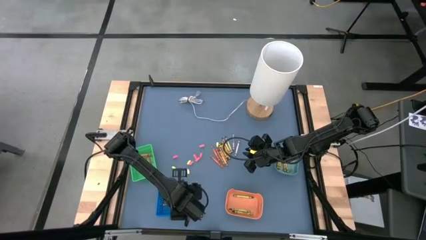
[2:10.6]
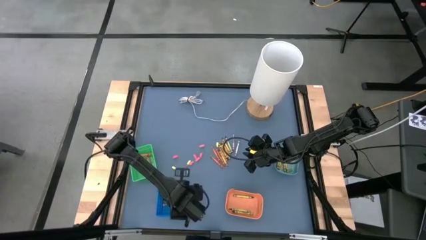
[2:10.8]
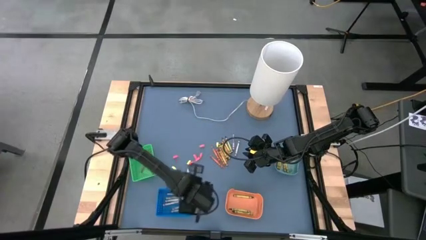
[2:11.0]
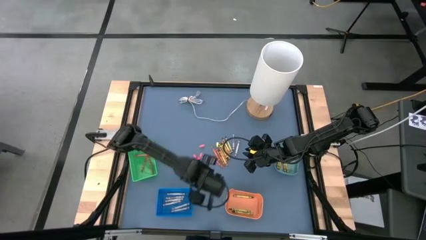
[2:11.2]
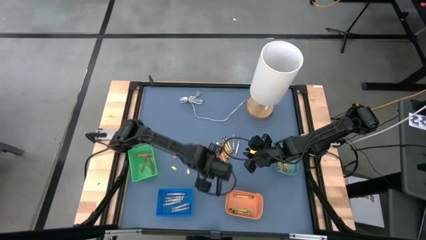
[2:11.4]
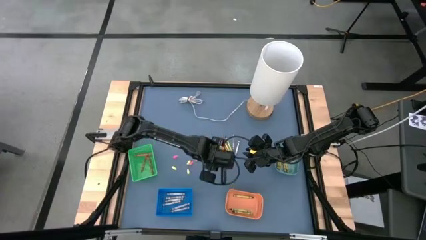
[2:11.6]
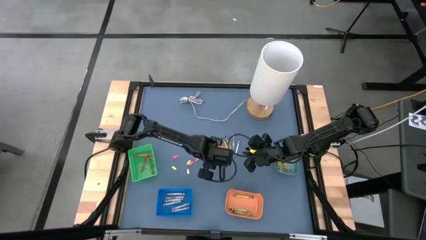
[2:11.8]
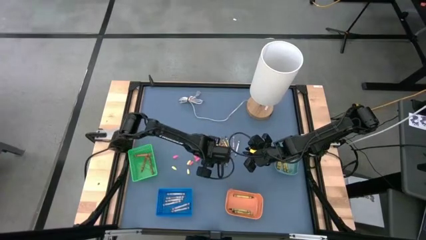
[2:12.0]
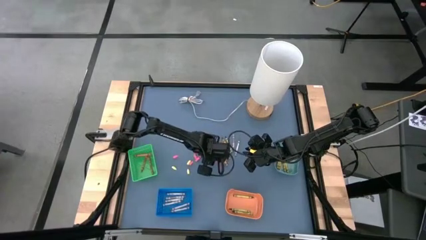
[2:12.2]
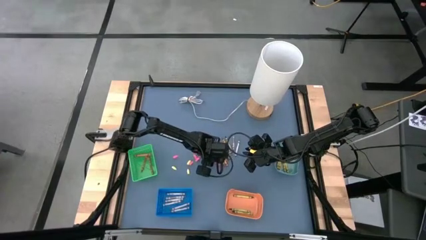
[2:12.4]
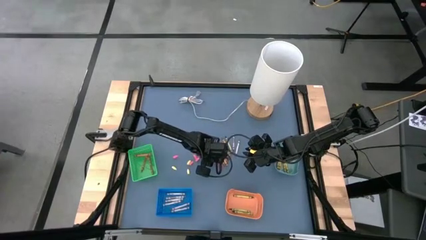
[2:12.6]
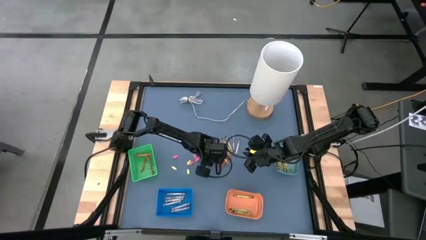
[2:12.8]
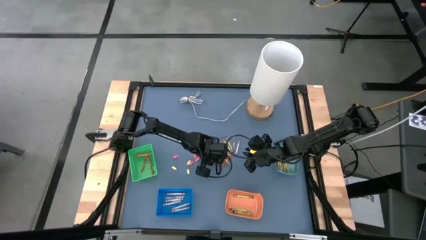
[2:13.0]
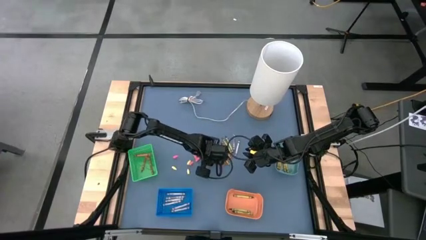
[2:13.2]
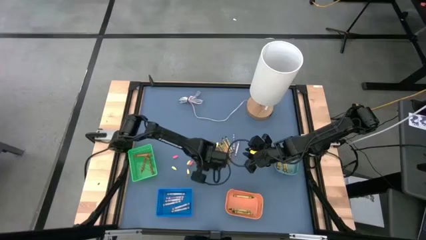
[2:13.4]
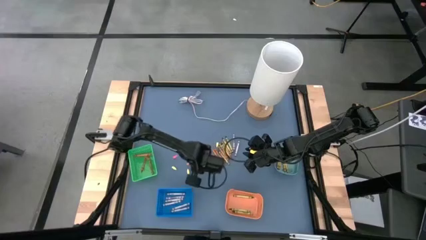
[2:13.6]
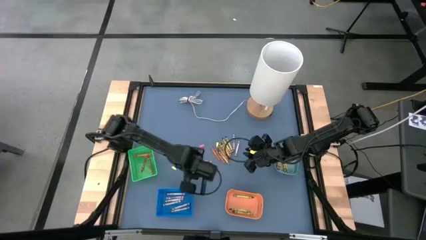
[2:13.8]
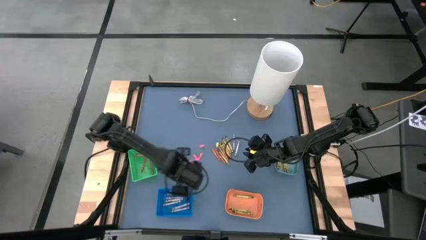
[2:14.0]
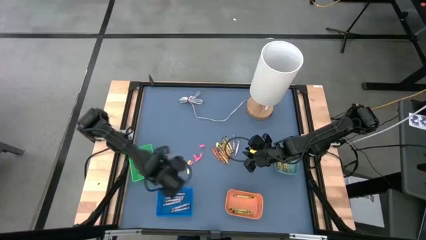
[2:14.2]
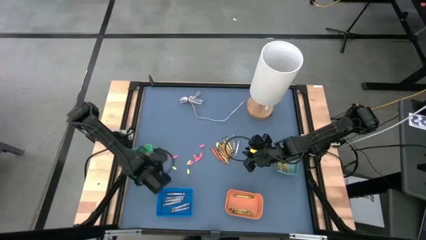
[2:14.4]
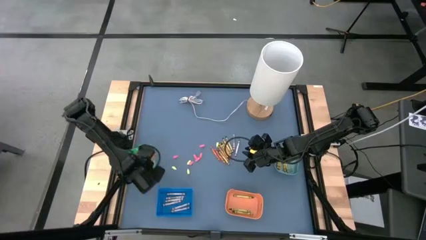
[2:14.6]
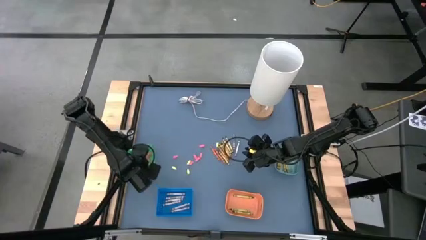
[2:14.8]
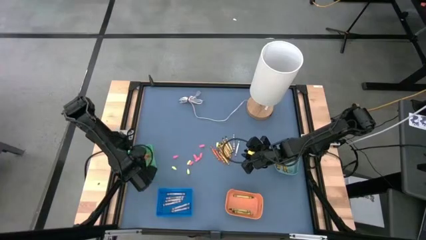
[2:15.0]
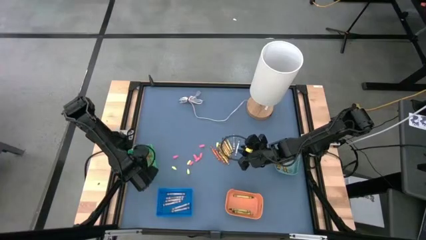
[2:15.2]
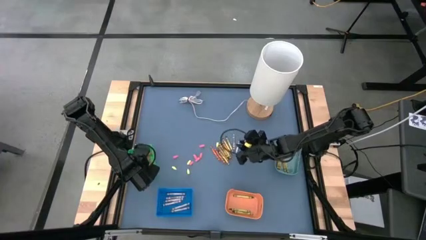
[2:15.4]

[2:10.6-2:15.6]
Task: Sort crayons
Put the orange crayon into the green bin

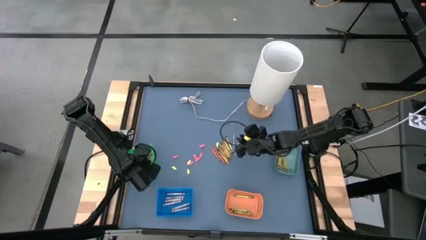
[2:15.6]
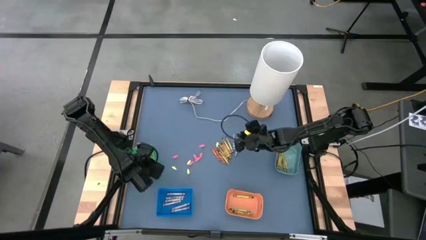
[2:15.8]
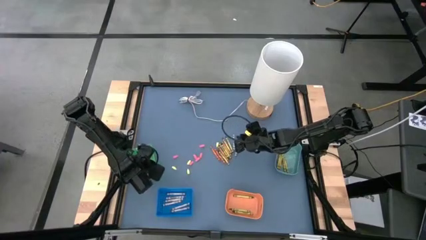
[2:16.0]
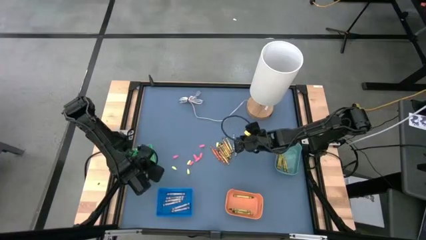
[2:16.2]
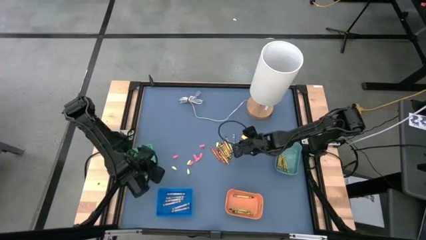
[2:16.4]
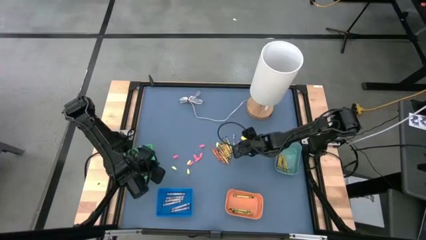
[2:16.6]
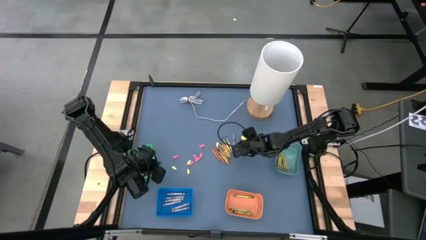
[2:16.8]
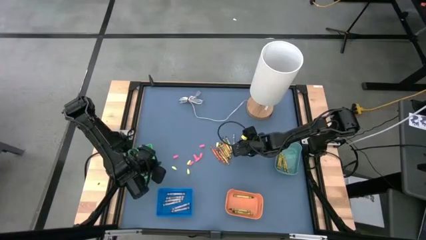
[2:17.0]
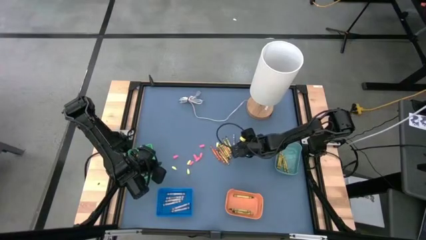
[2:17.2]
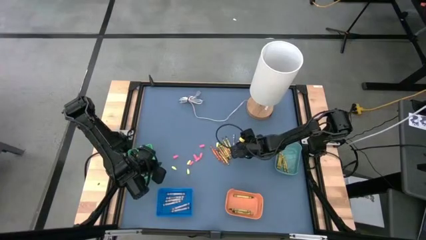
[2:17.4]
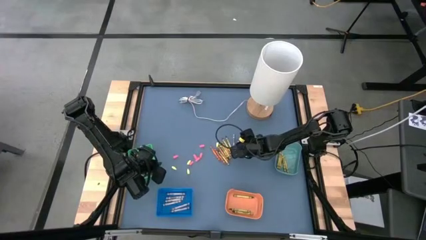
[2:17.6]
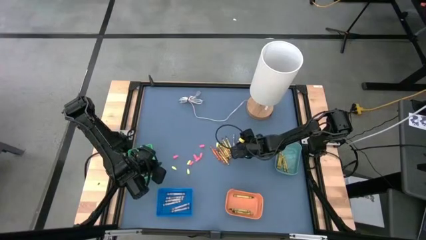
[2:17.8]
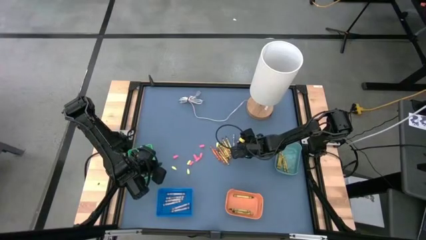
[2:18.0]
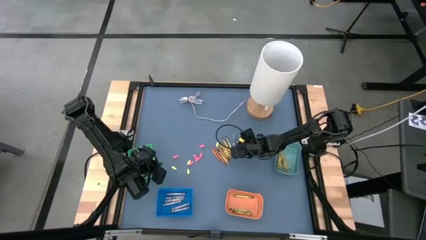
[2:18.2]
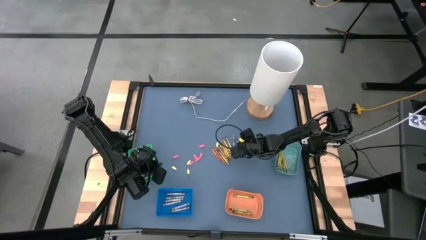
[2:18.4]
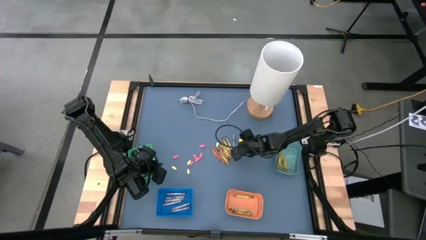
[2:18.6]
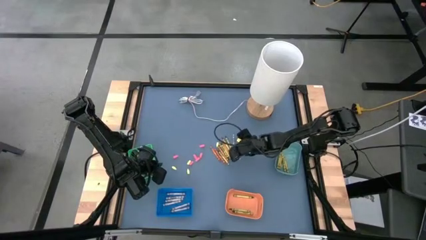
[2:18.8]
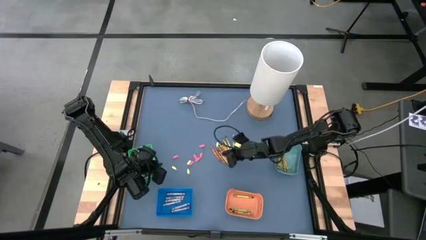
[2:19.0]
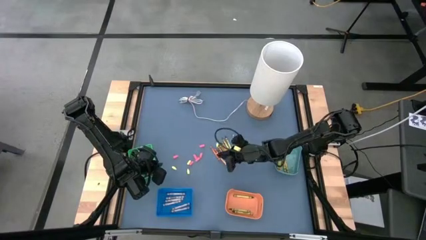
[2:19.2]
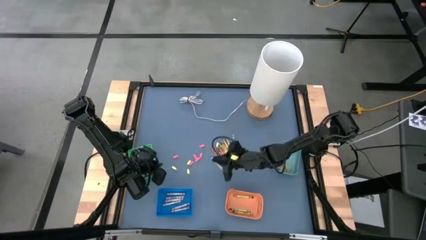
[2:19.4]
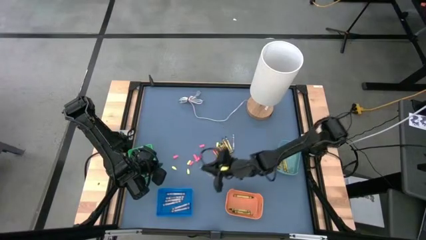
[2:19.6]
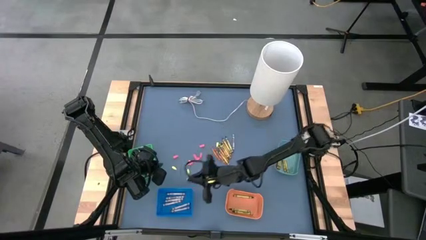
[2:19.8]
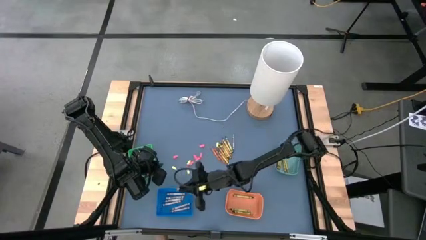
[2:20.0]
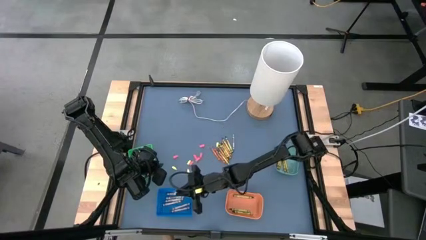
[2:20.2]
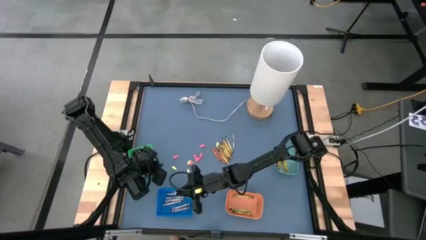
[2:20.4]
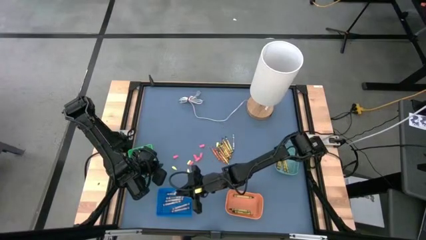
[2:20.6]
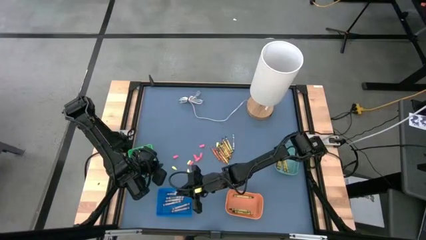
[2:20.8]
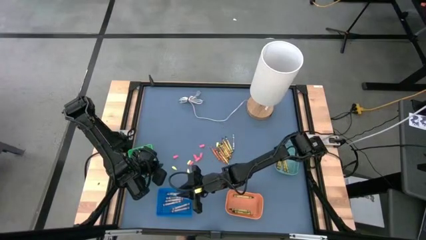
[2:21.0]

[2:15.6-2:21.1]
Put the gray crayon into the blue bin

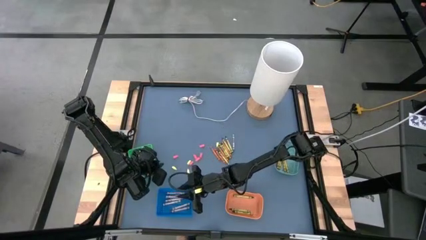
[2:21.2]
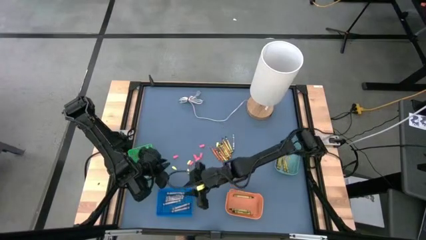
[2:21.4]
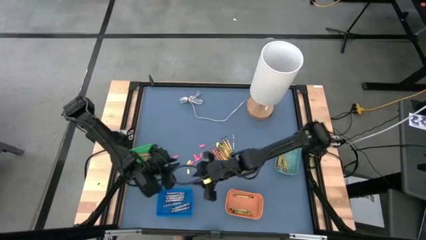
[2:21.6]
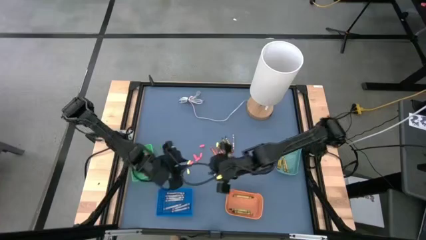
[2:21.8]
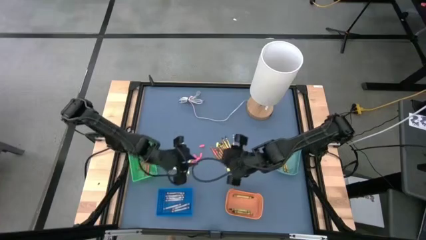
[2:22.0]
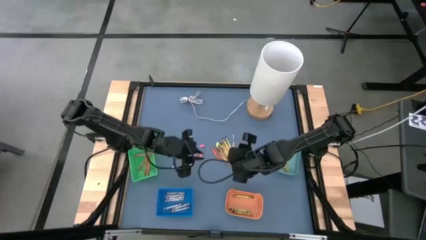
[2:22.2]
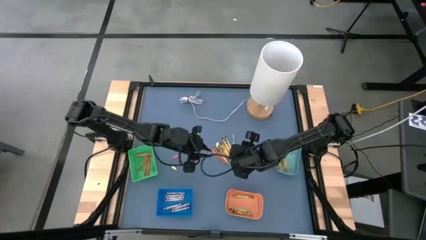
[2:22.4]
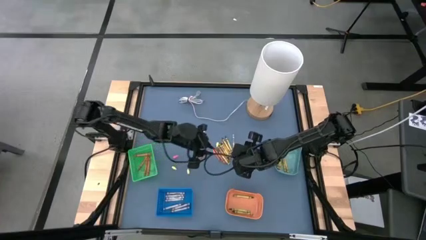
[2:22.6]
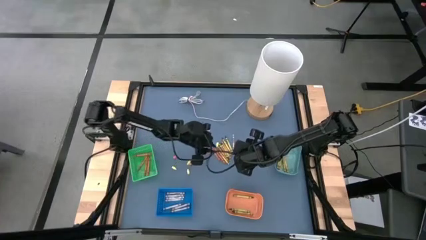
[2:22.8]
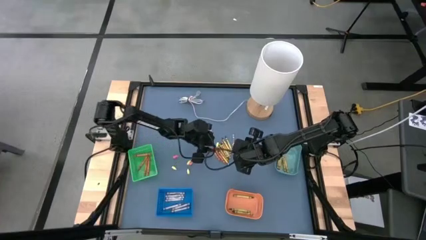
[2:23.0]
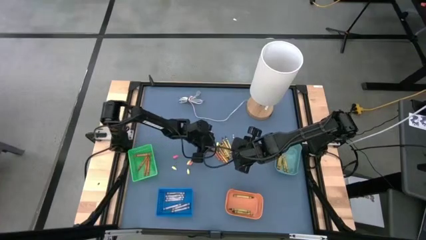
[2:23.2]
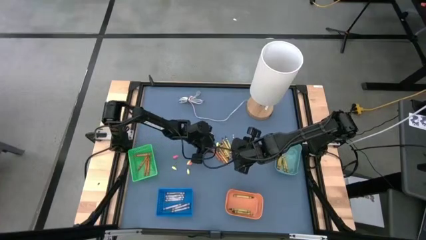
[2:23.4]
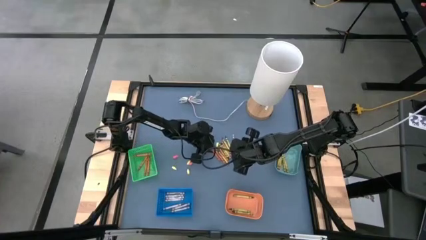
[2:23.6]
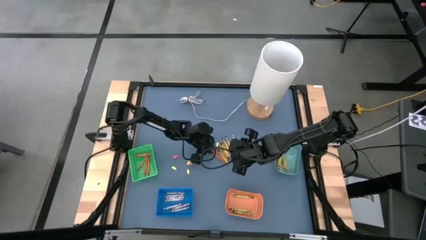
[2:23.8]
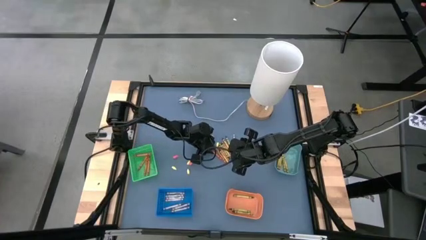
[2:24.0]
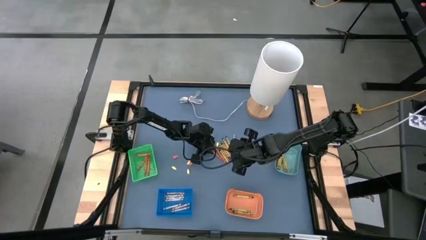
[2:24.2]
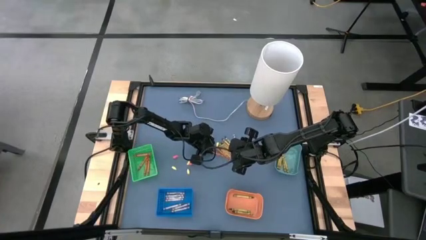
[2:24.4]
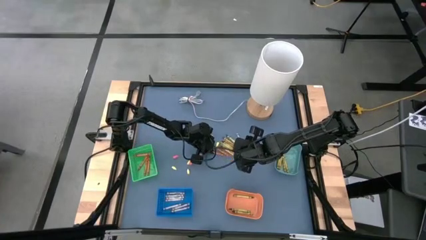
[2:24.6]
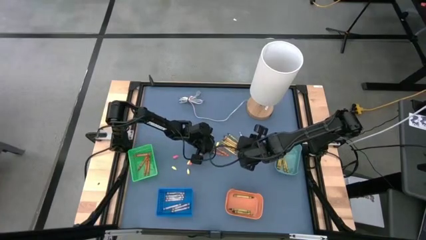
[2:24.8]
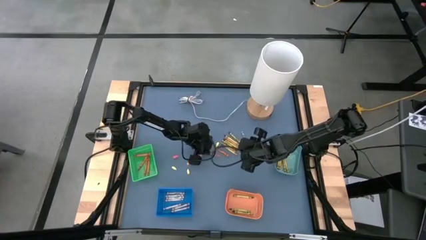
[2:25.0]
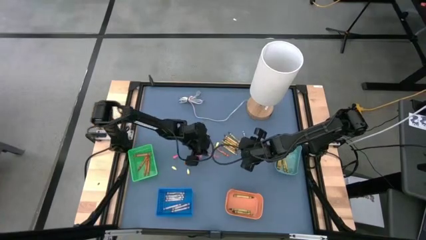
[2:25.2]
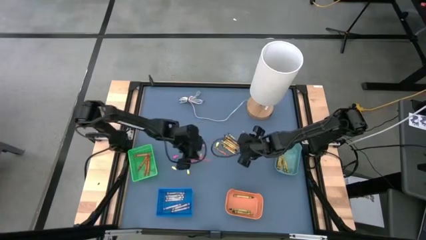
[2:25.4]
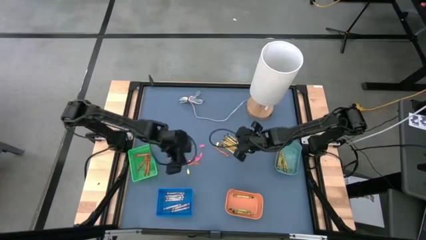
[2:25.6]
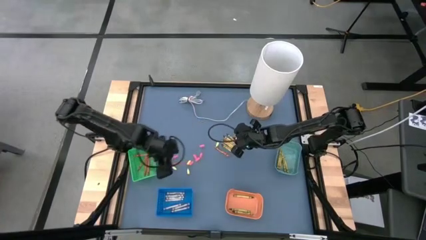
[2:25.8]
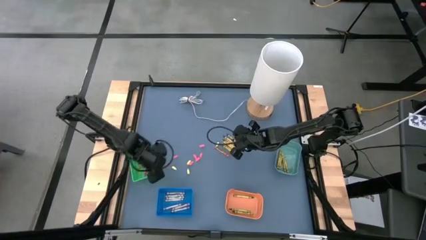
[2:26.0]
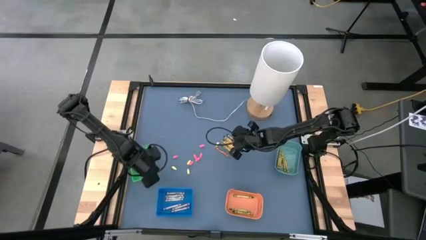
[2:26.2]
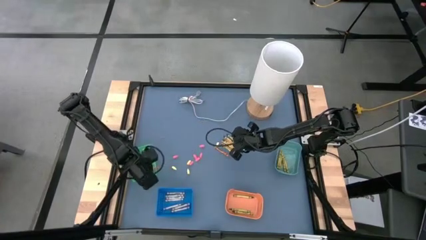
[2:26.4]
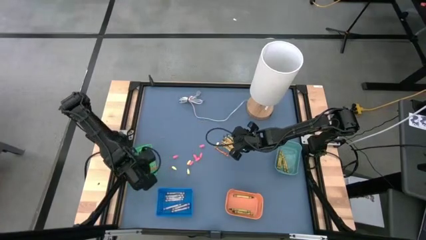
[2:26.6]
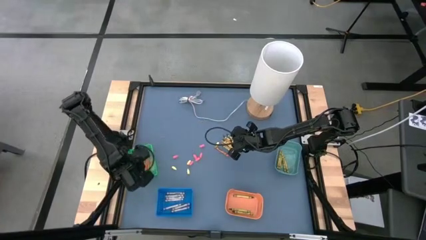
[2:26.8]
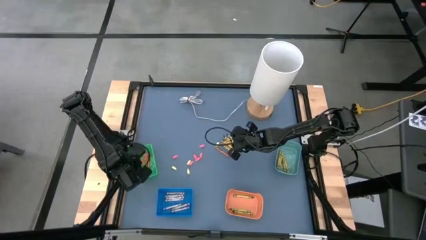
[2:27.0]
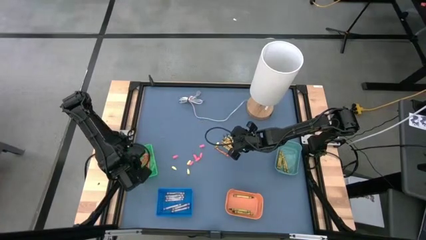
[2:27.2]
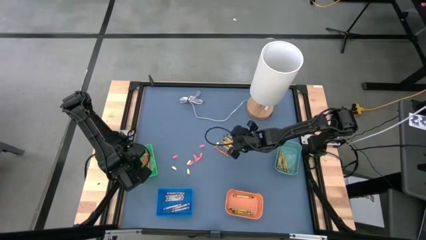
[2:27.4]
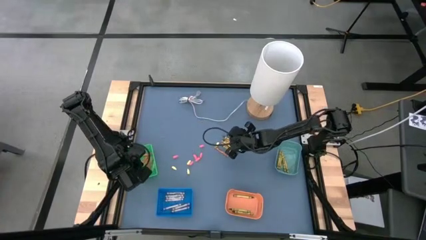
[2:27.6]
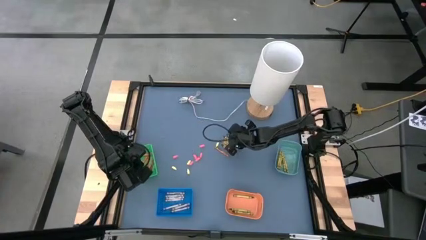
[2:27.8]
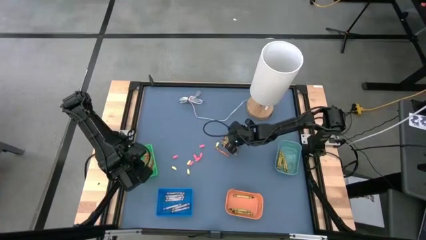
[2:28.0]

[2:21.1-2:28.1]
Put the orange crayon into the green bin
